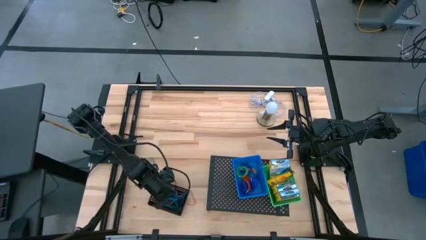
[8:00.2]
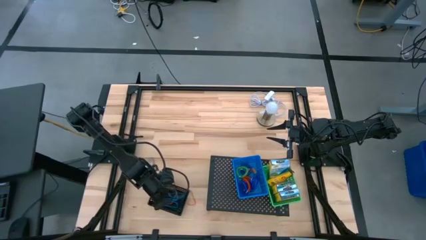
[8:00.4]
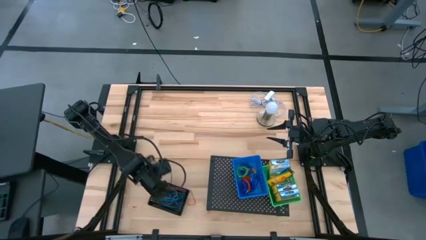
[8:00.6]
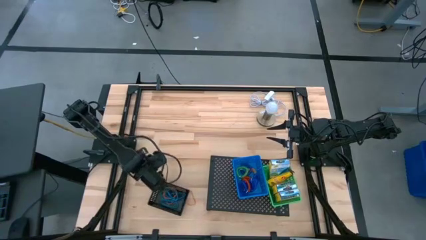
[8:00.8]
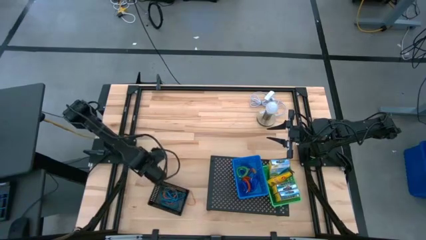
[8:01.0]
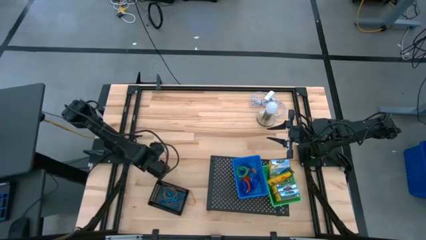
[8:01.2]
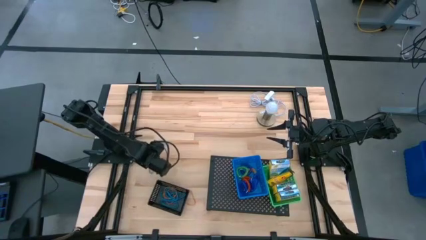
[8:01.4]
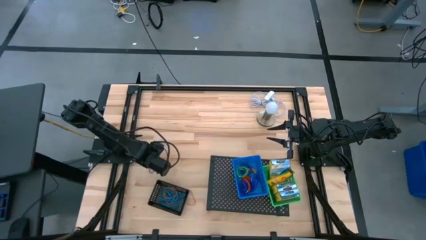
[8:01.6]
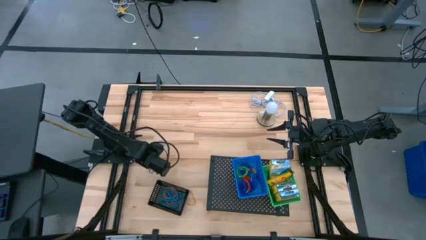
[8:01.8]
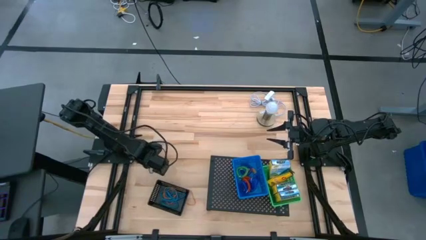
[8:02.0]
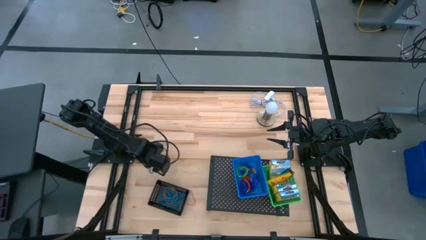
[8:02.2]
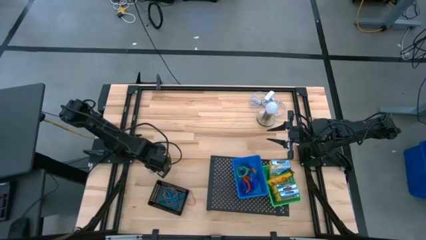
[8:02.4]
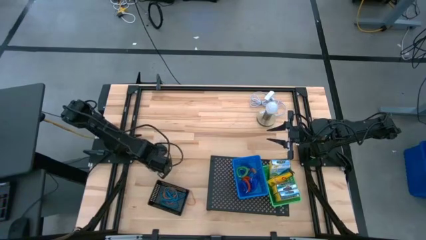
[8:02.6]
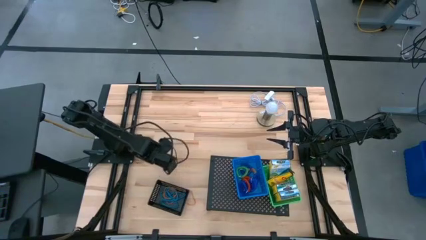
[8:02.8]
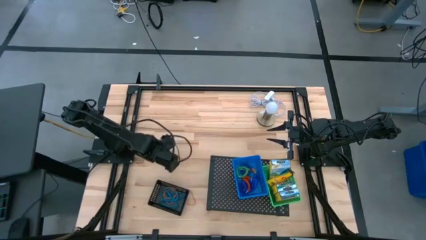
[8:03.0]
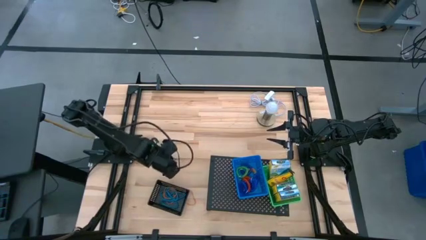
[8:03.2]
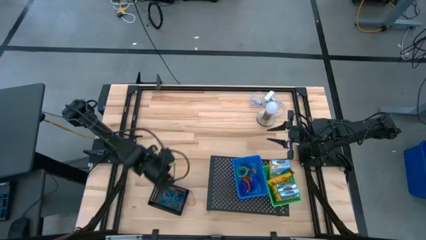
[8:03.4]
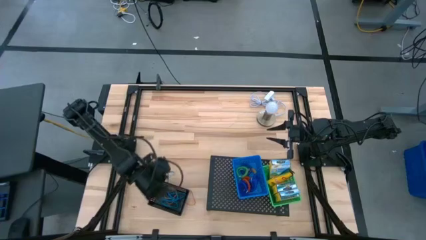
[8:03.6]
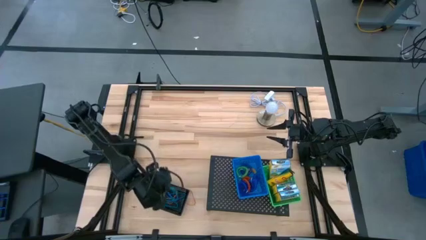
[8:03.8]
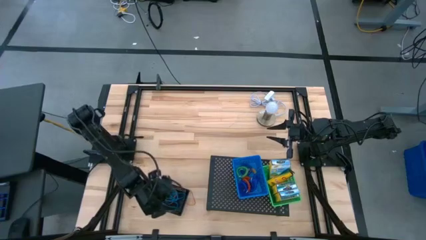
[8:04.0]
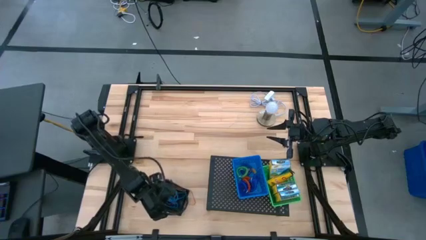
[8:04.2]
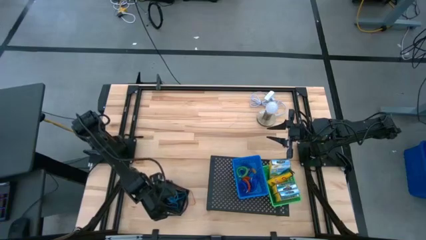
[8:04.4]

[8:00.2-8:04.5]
Task: Pick & Place Office Desk Supplies
Put the blue rubber band into the black bin

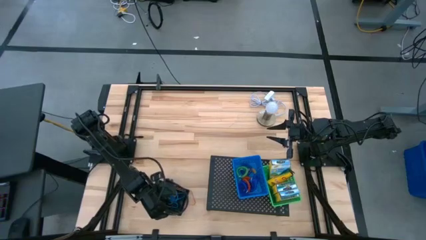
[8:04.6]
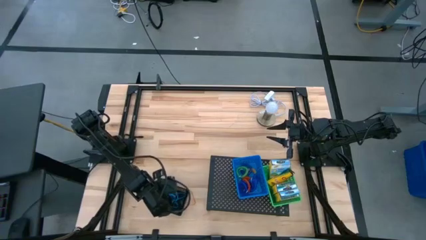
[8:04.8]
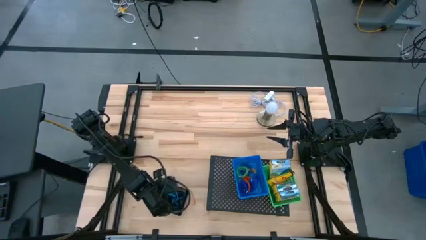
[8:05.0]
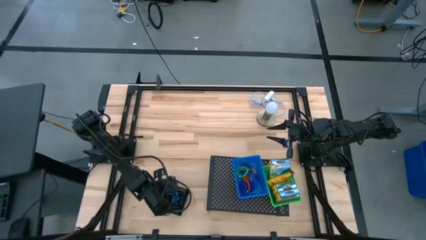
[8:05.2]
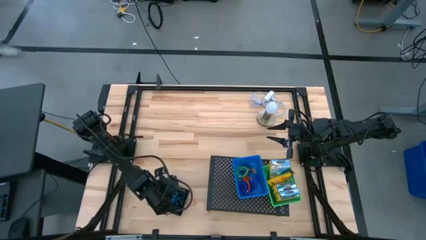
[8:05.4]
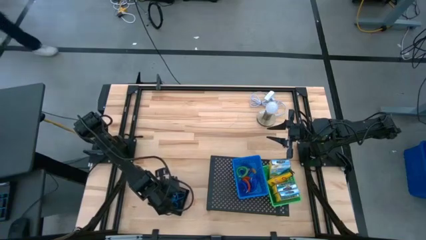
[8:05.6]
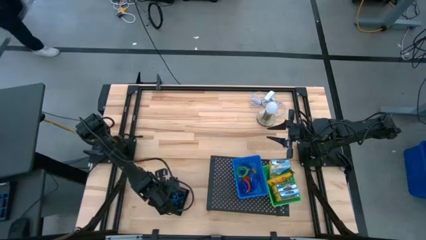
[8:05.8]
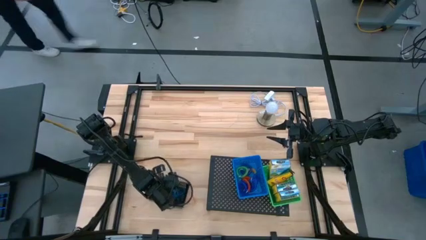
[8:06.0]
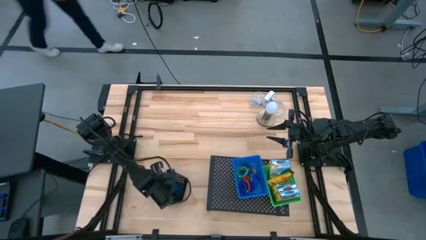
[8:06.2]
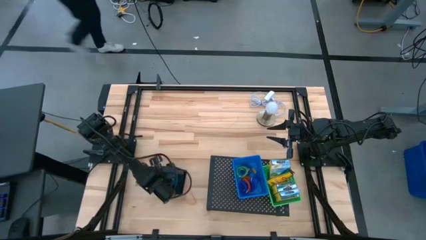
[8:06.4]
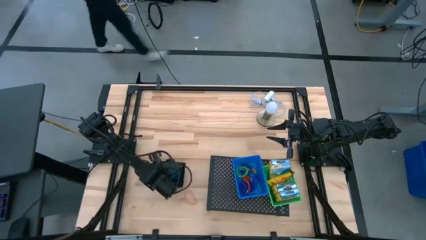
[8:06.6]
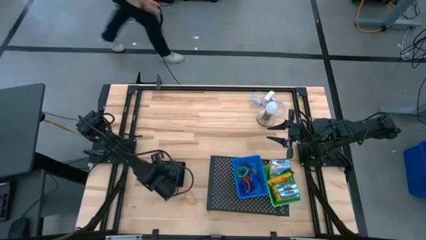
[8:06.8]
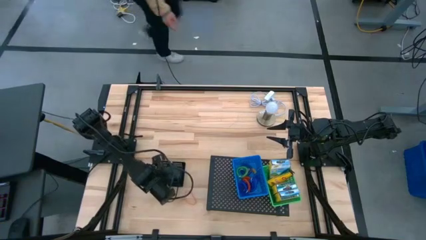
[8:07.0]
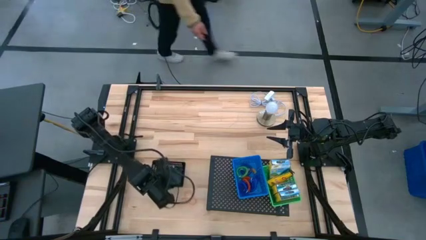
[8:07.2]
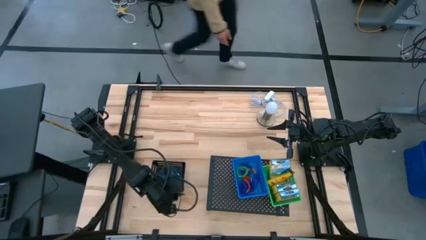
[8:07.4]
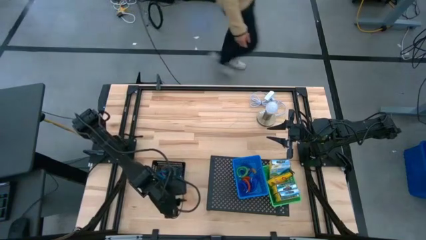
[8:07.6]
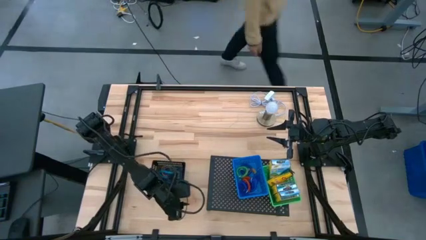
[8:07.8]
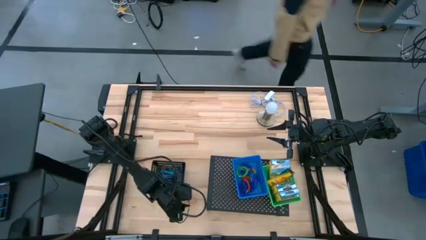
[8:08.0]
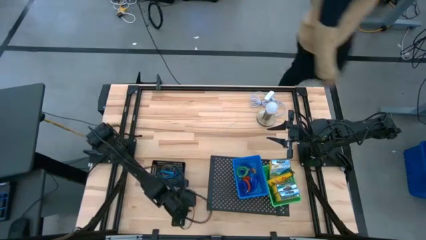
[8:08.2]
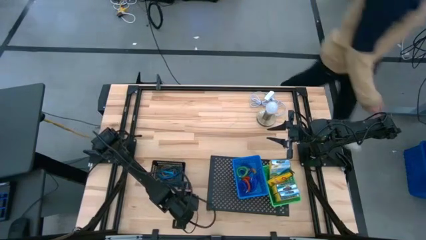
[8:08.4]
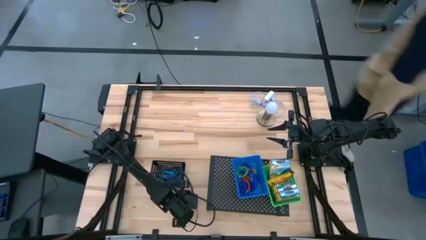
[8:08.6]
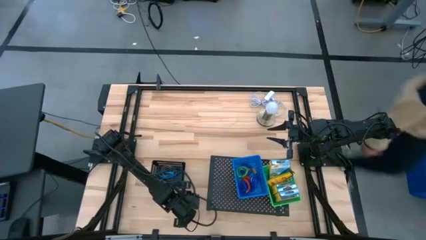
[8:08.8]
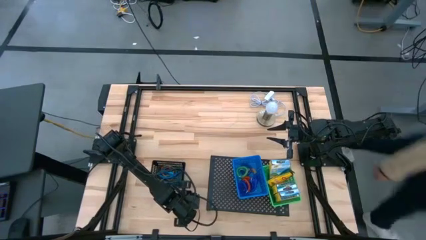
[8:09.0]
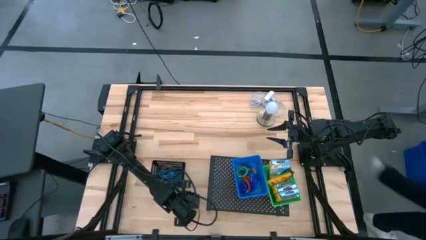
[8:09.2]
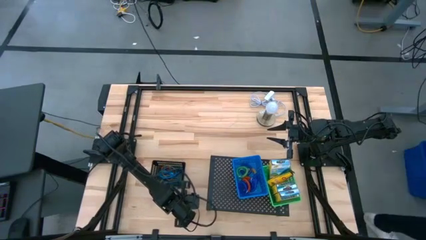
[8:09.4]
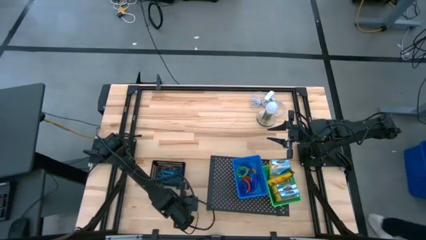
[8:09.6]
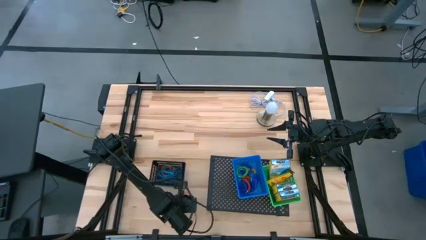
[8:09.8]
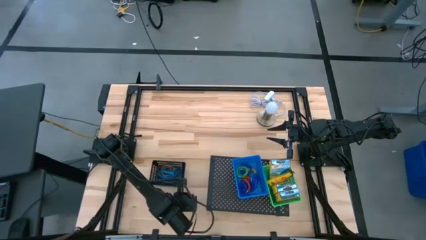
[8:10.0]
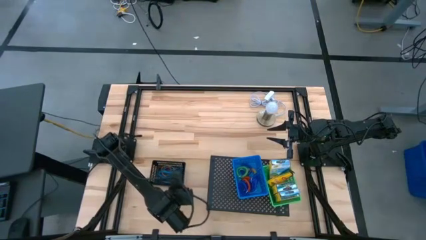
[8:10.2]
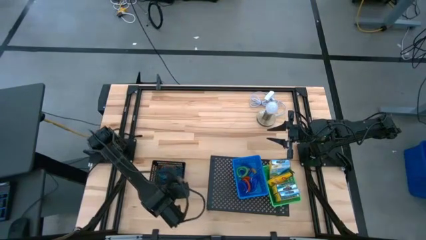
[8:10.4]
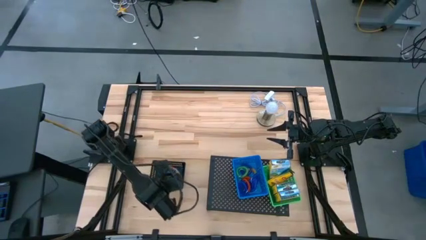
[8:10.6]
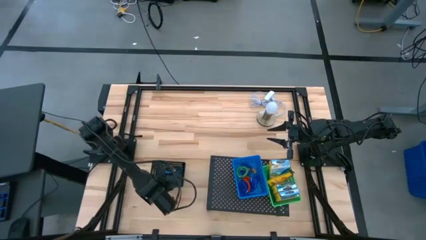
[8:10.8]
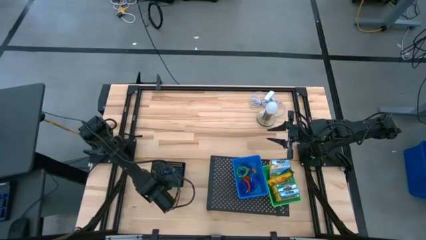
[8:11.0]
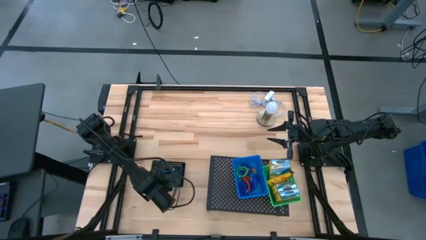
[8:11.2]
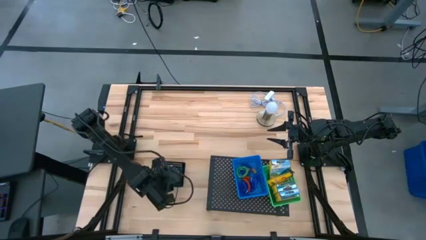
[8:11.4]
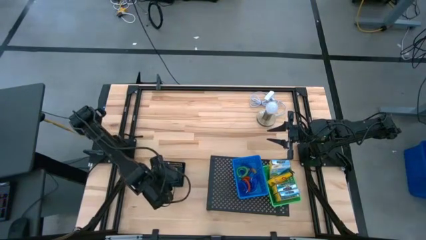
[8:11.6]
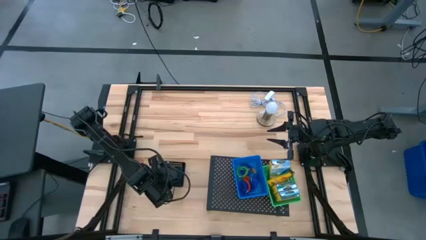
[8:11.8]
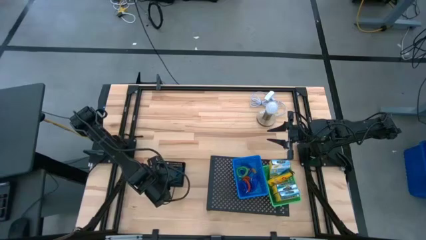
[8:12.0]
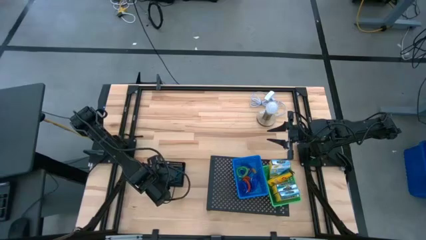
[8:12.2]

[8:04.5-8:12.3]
Put the orange rubber band into the black bin

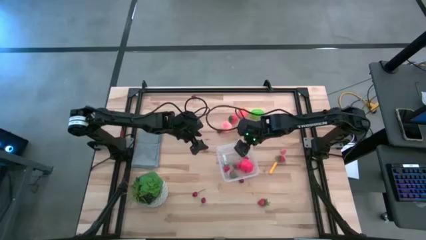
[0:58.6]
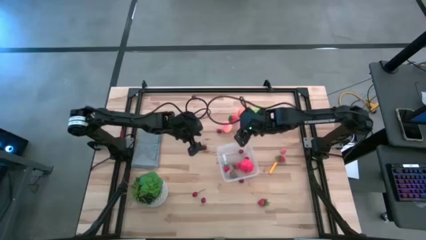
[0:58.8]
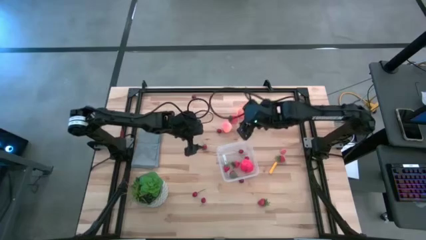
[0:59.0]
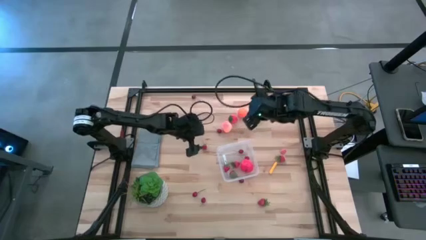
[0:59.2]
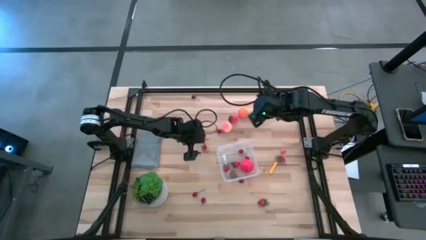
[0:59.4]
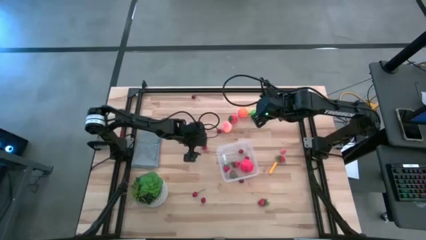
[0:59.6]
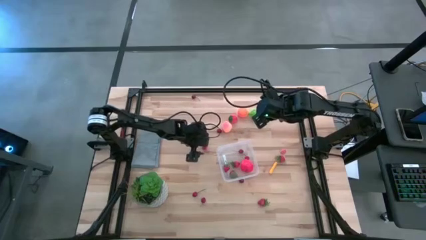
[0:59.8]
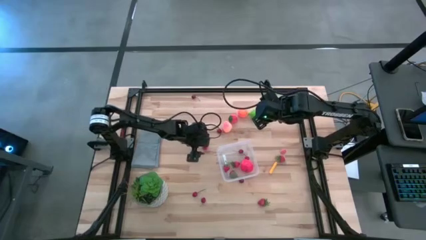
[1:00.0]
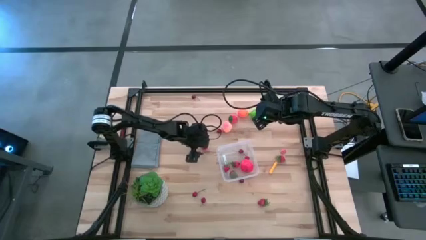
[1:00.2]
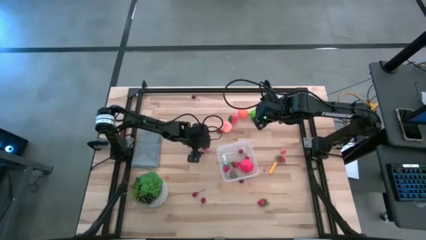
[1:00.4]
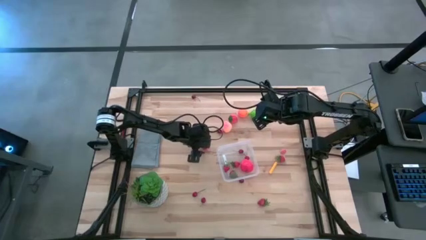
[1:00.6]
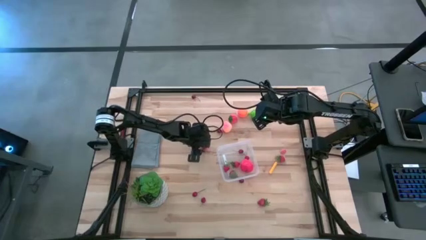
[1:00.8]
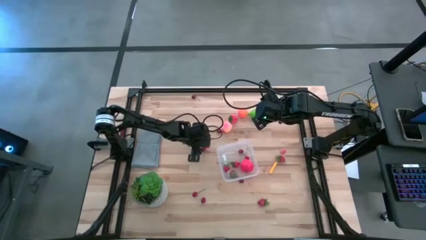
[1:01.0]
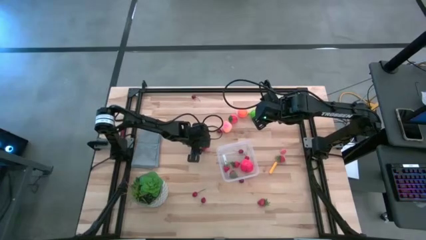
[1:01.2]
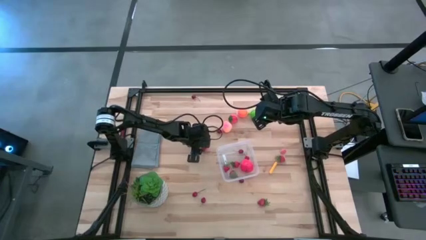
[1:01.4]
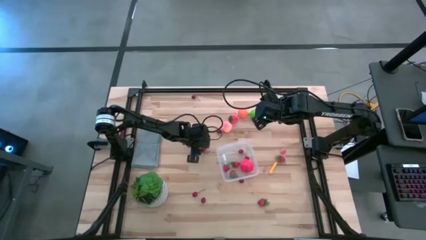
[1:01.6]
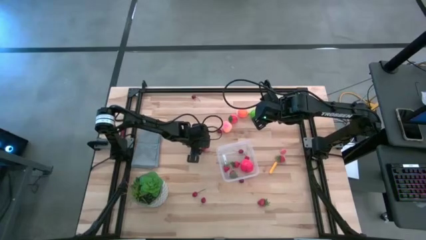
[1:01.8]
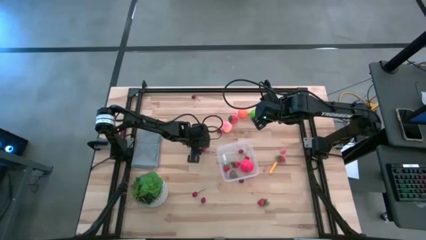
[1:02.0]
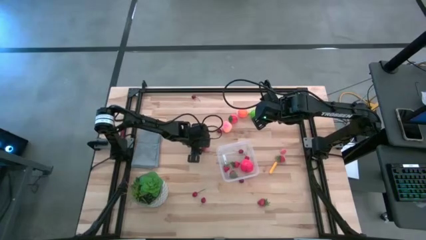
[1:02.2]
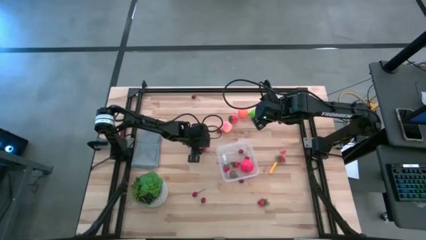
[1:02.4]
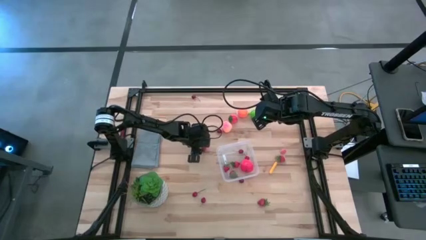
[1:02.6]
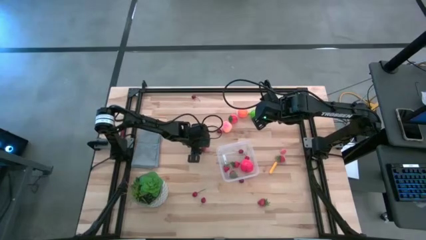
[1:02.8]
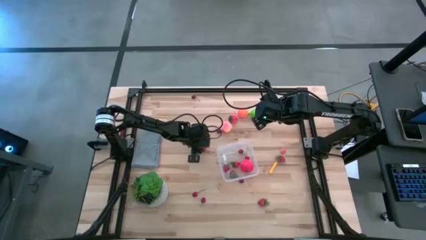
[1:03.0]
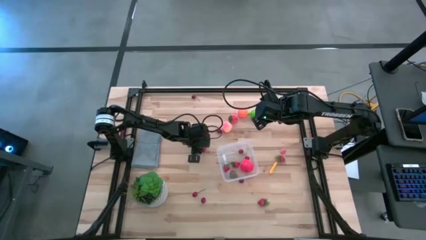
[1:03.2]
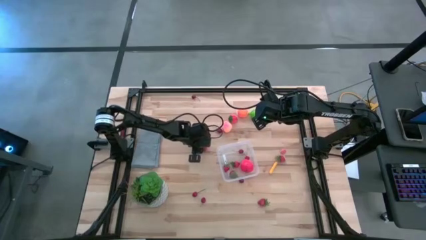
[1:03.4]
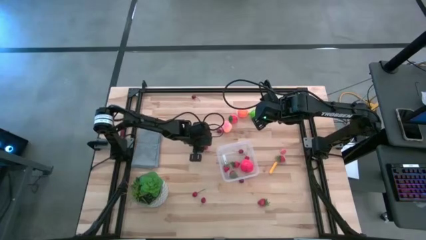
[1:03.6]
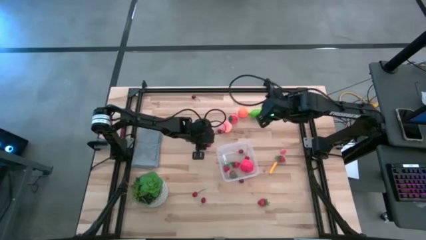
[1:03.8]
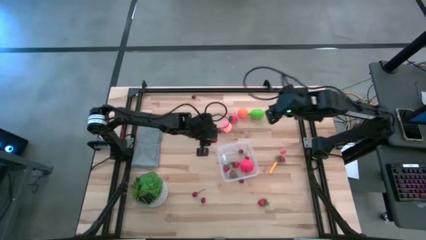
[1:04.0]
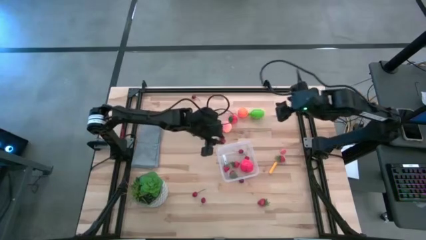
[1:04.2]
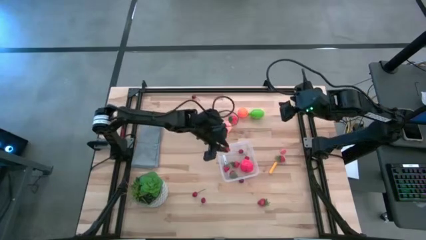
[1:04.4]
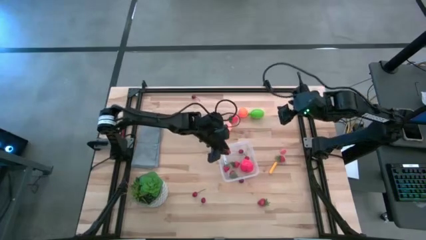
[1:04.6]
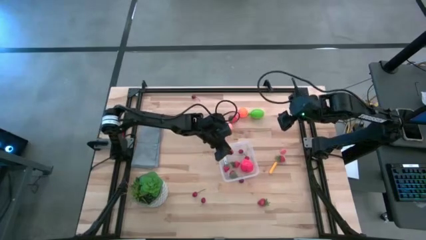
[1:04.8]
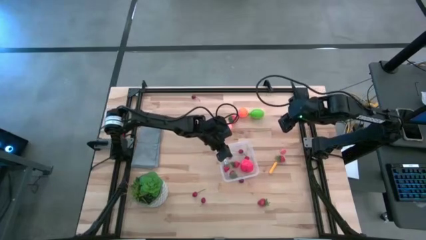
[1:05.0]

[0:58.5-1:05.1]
Task: Pick and placing Produce into tupperware
Put the strawberry into the transparent bin
